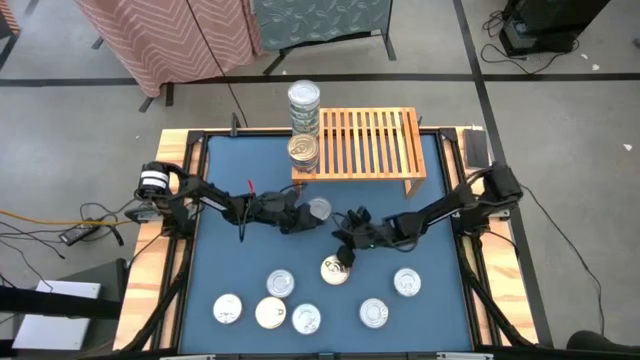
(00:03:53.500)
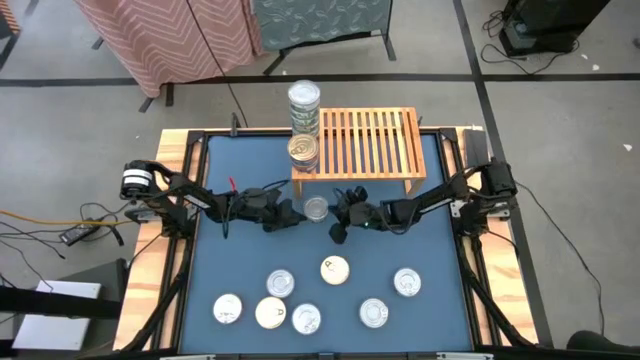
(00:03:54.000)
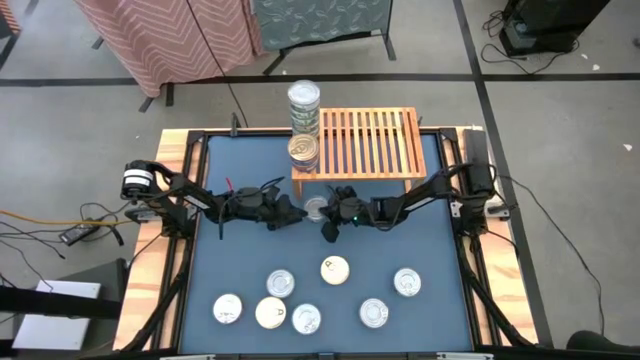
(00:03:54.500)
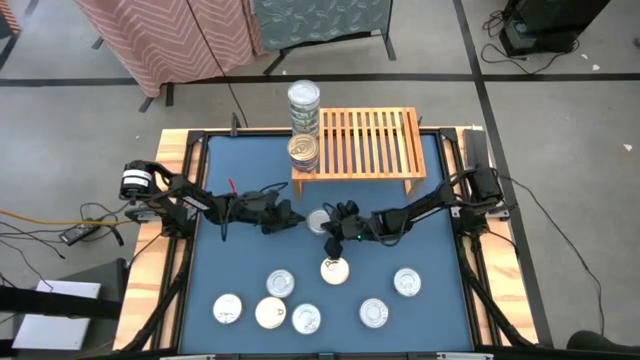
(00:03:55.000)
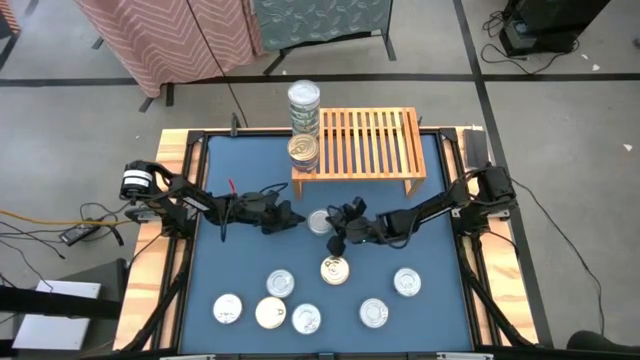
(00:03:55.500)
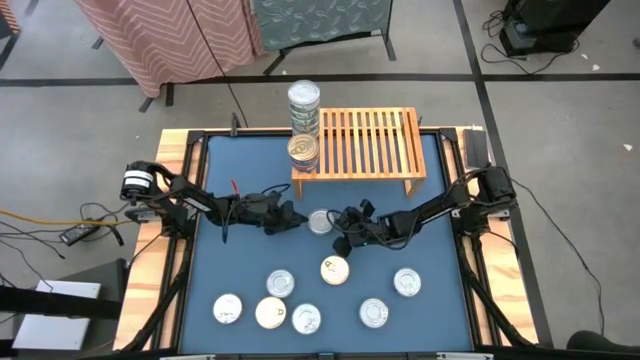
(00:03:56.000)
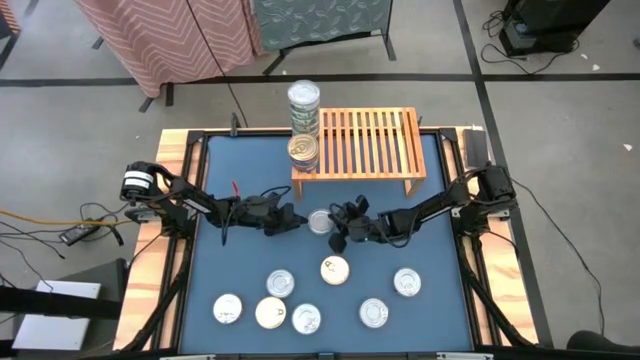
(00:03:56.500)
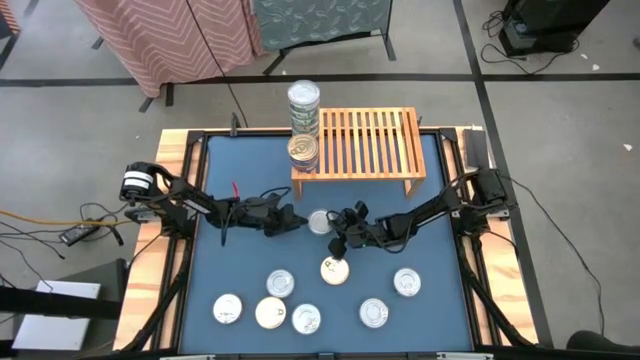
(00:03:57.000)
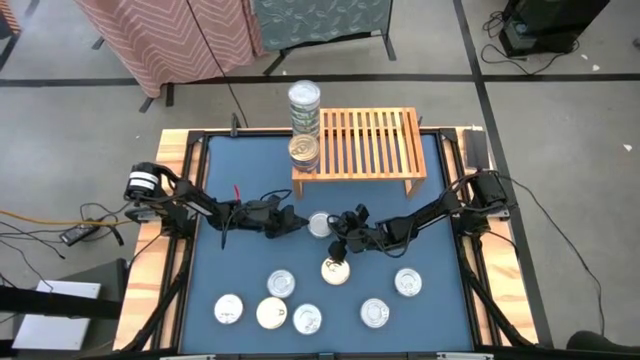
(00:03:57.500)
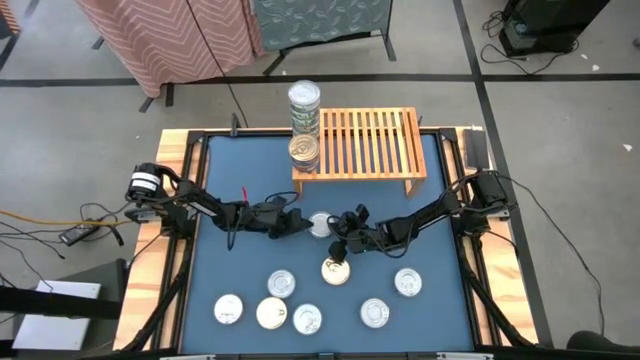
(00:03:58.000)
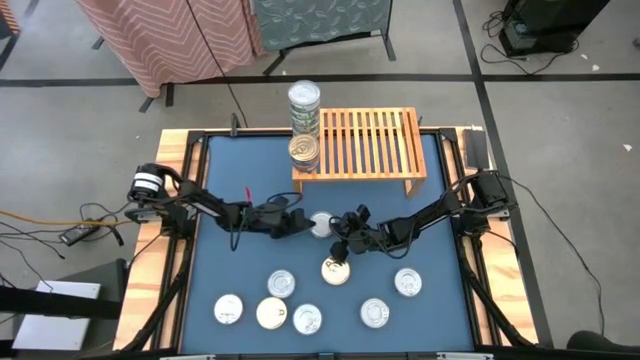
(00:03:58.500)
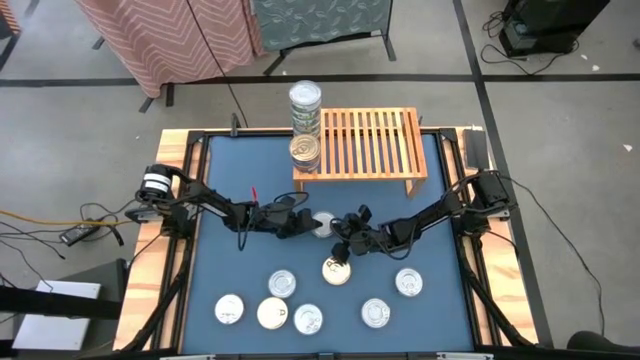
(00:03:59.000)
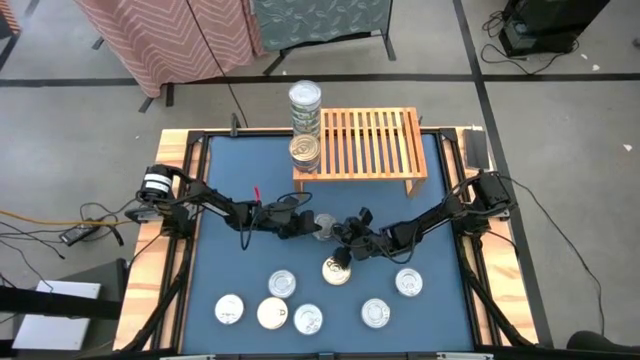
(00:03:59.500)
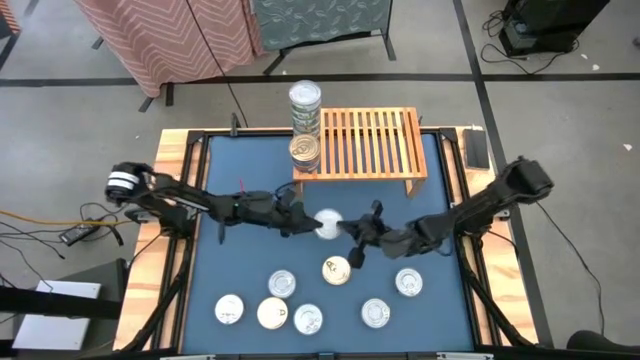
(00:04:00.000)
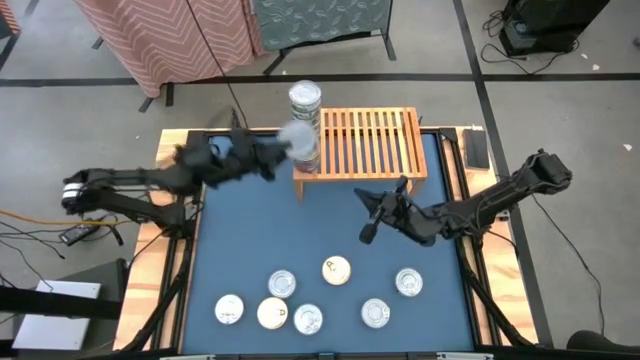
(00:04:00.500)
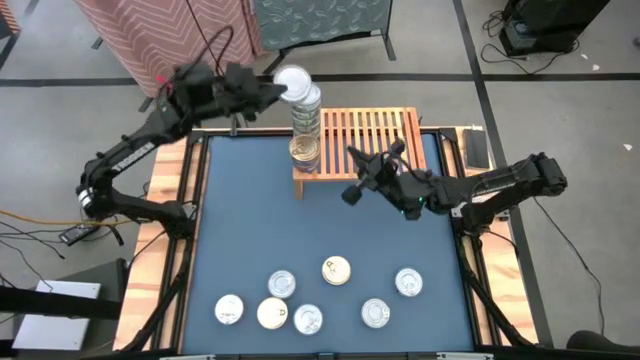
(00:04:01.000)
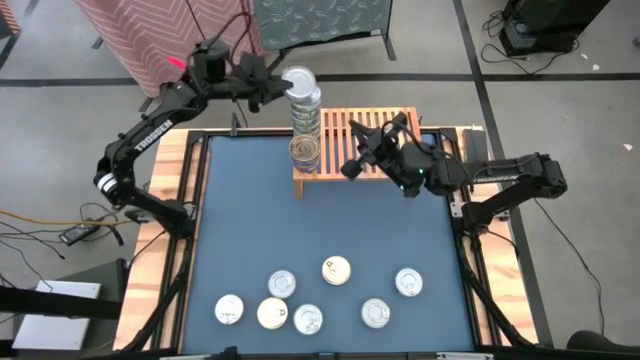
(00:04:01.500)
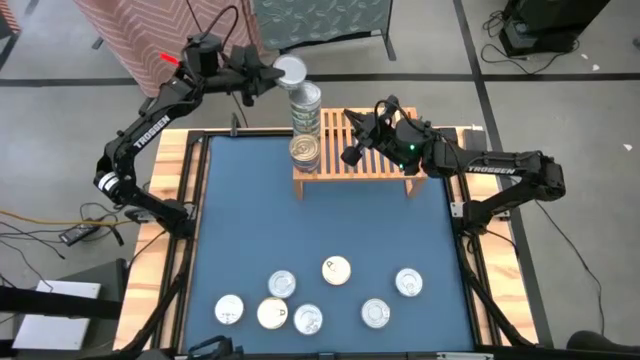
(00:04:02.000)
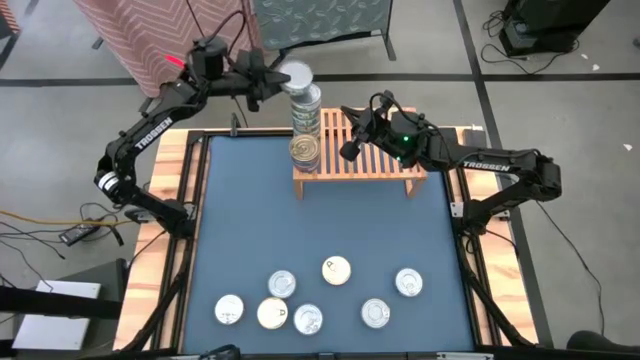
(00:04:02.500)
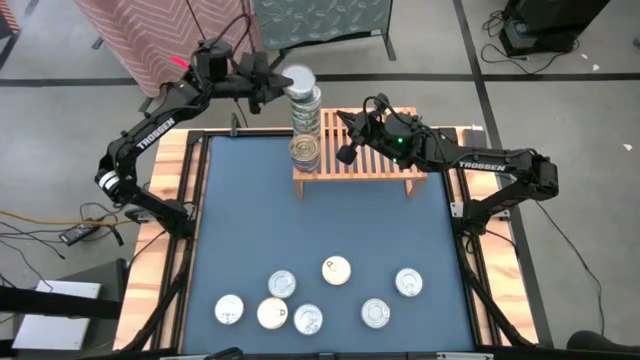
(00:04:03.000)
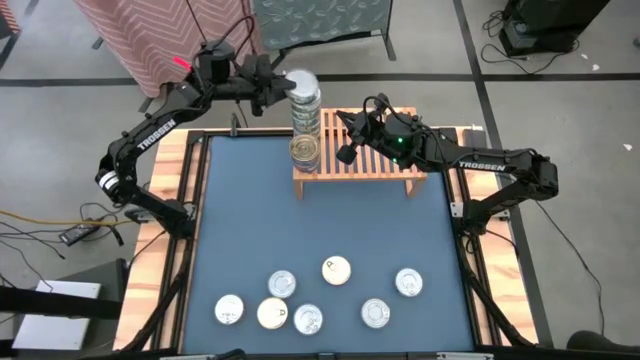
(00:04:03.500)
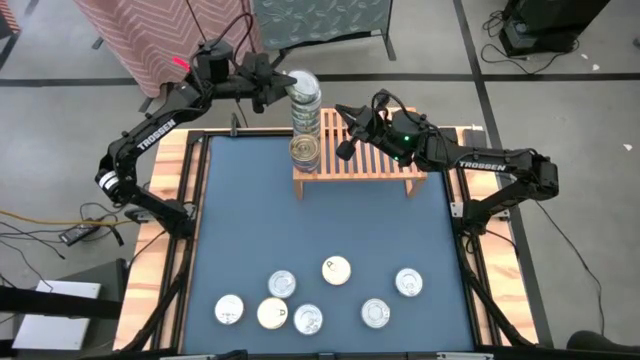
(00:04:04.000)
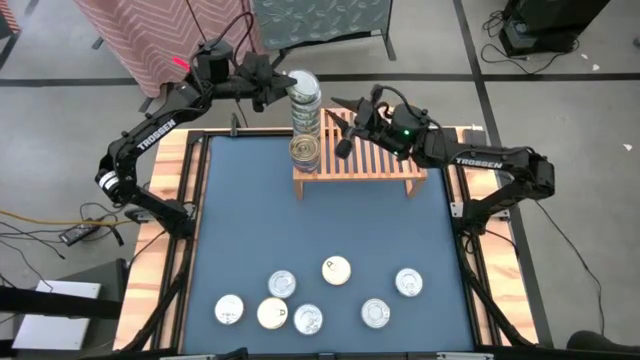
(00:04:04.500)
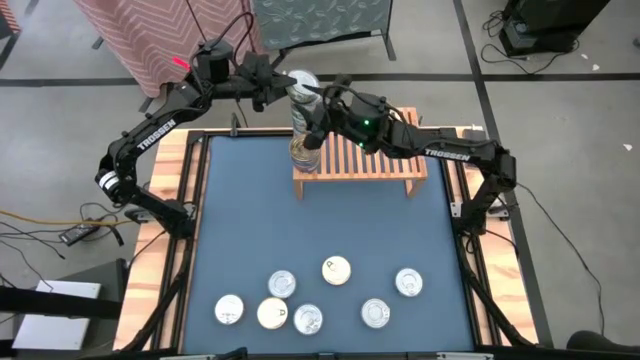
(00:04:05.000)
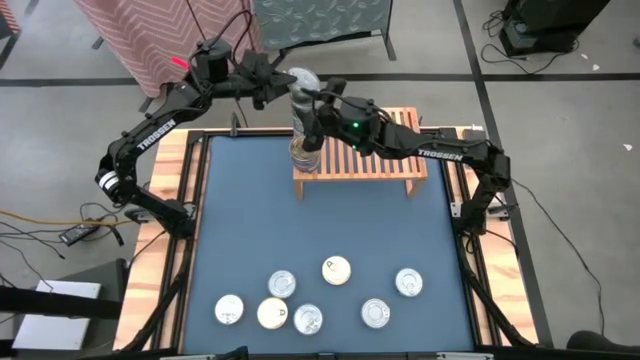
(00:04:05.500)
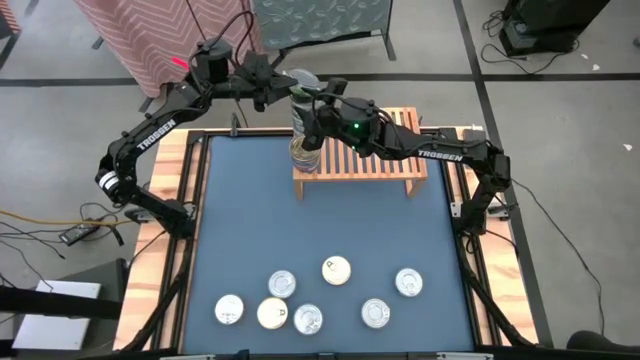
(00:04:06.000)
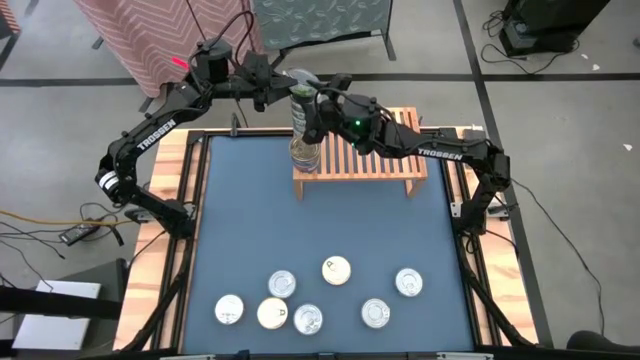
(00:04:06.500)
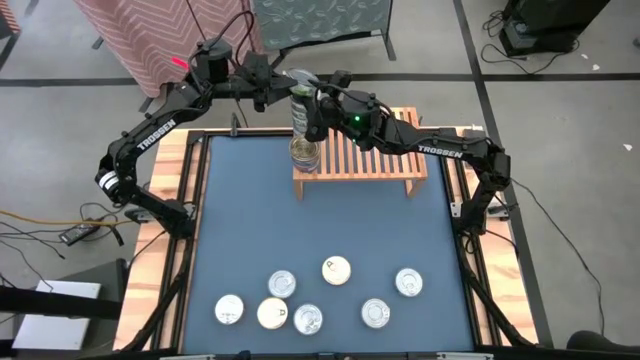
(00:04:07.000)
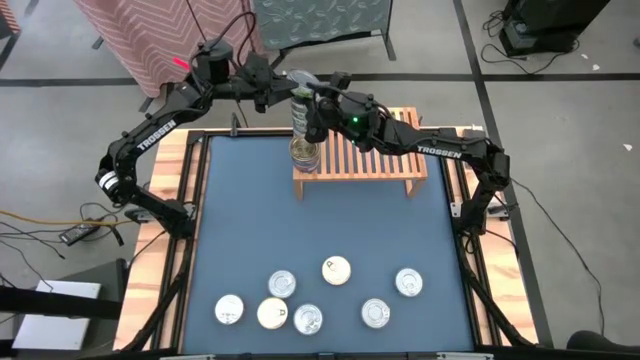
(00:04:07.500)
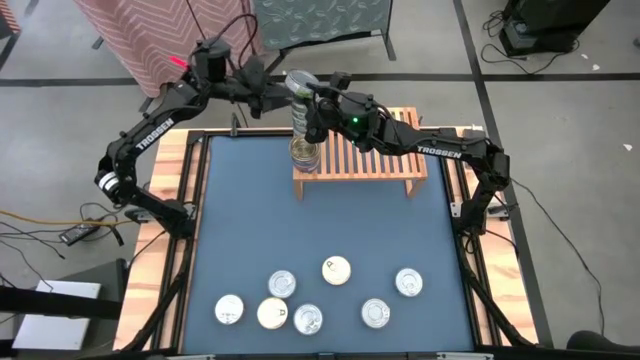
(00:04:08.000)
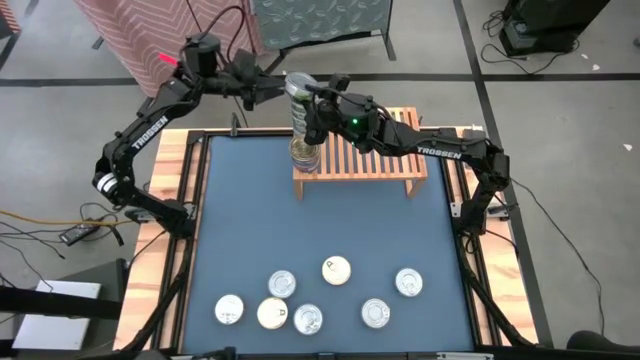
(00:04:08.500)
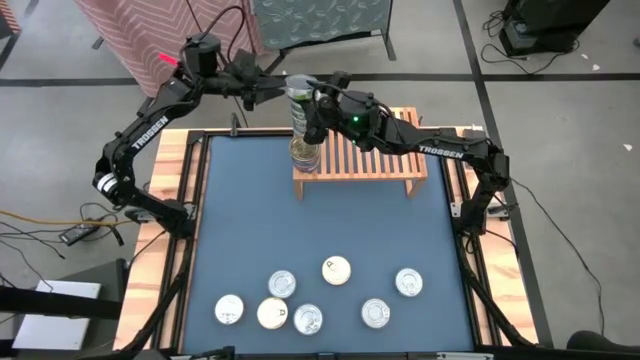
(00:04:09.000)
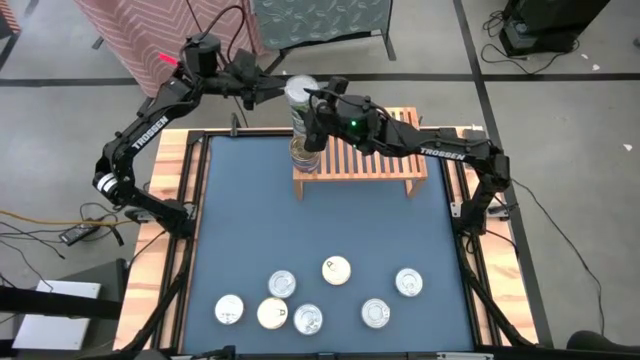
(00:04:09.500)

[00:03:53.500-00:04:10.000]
Task: Stack canned seafood by type on shelf
Stack the green tuna can on top of the other green tuna cans on the shelf

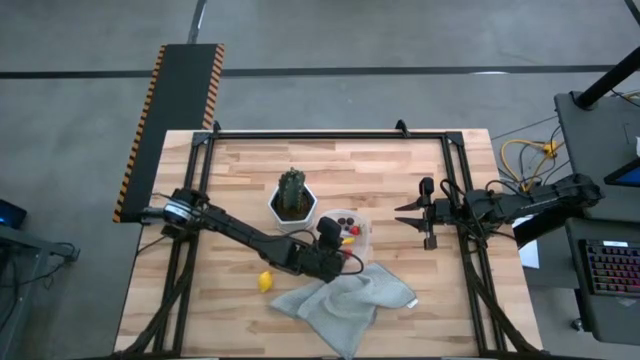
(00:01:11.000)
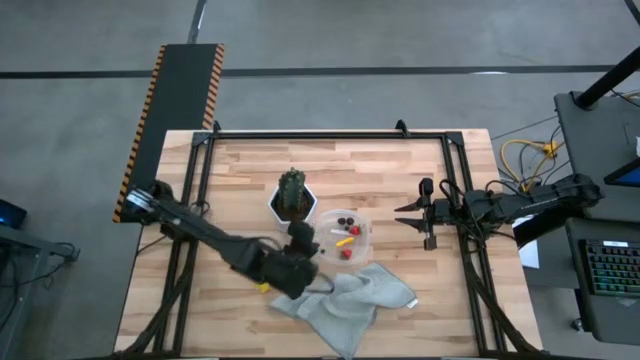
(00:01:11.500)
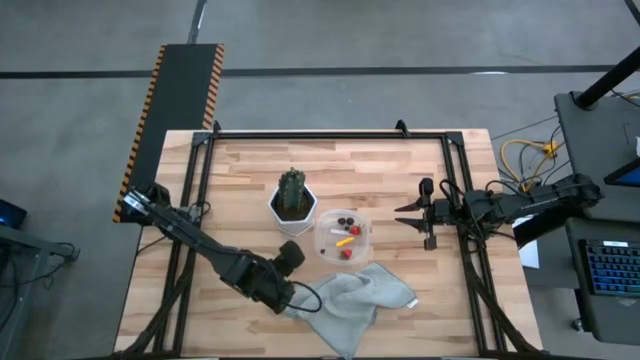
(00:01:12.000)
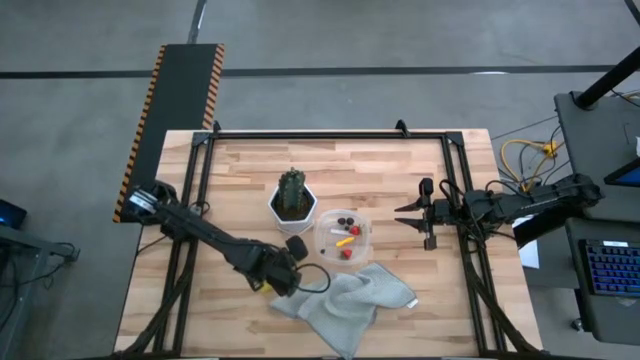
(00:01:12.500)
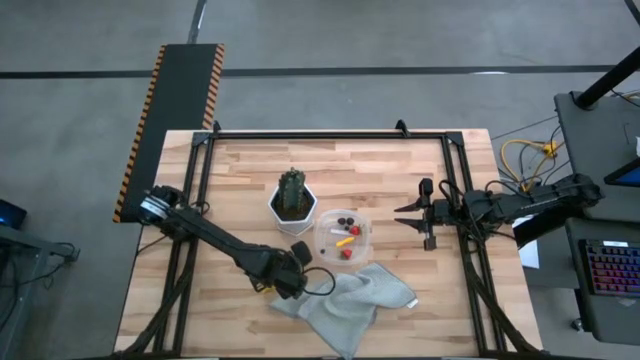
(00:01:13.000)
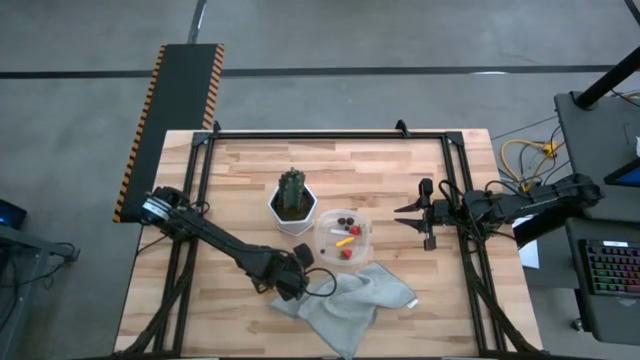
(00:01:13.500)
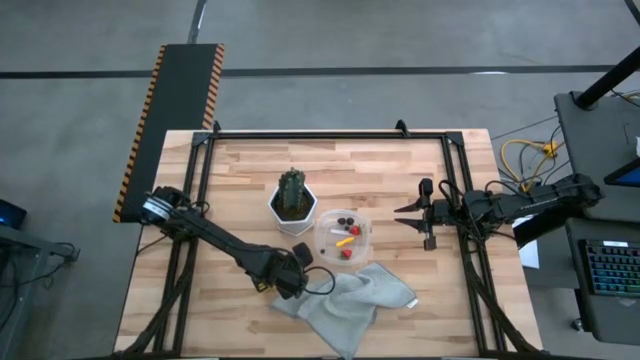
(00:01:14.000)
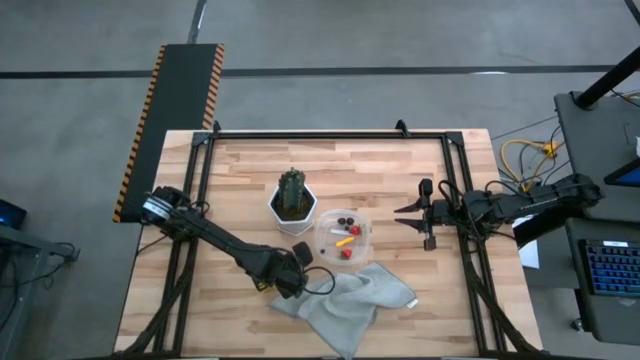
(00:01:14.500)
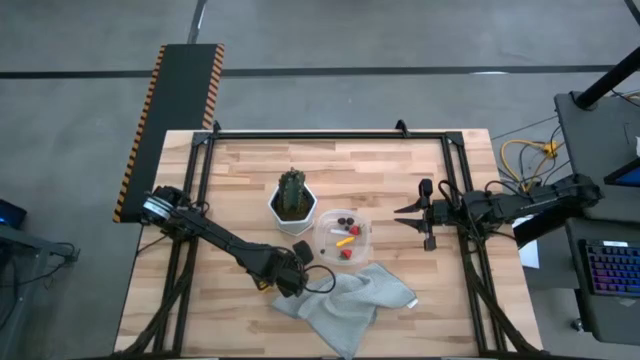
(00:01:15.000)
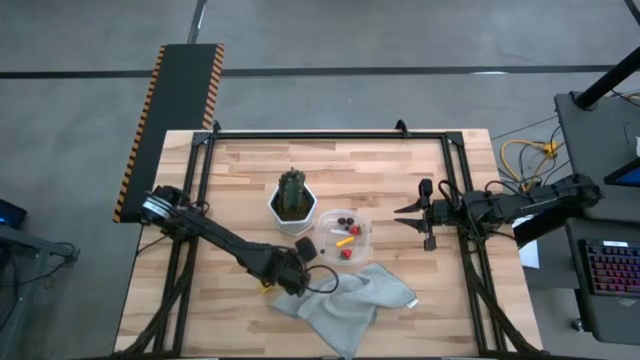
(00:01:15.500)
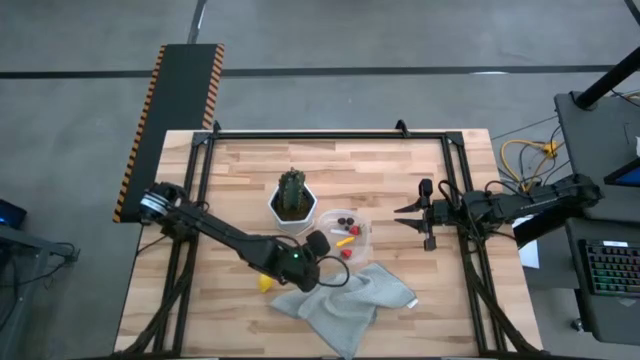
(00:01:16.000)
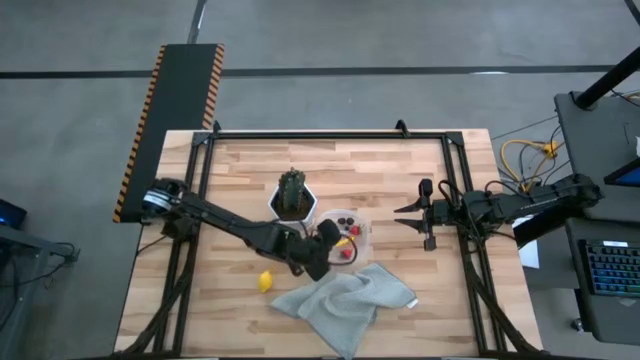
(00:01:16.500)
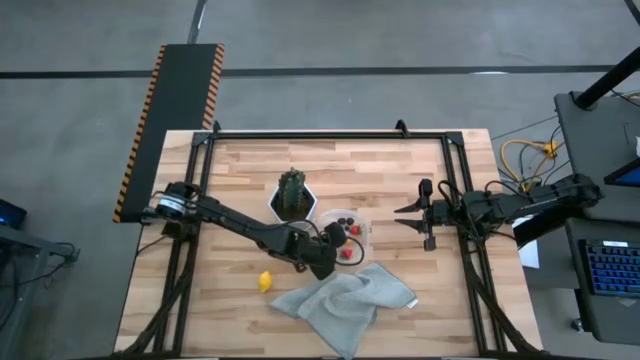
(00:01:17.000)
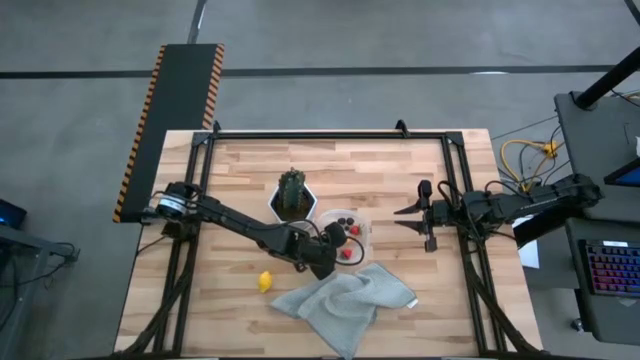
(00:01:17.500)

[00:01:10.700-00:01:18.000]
Task: Pick and placing Produce into tupperware
Put the strawberry into the transparent bin
